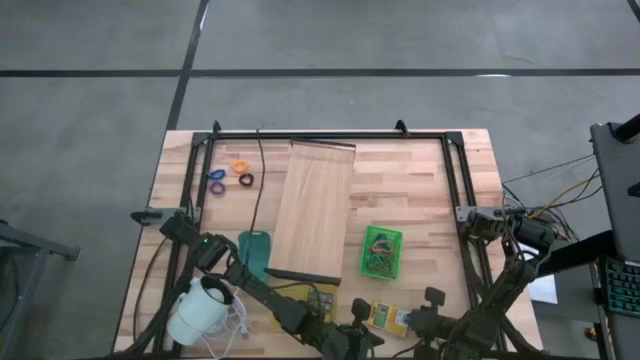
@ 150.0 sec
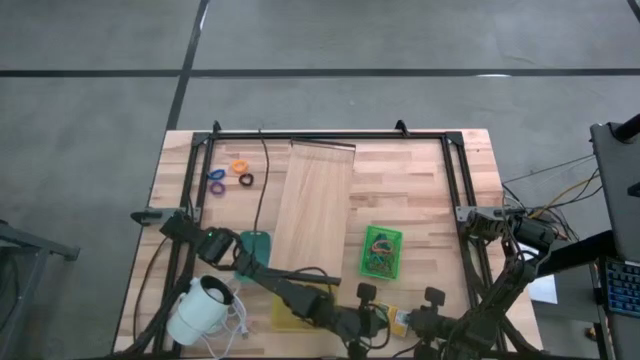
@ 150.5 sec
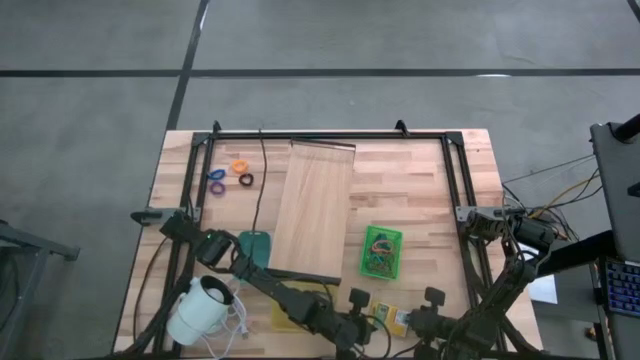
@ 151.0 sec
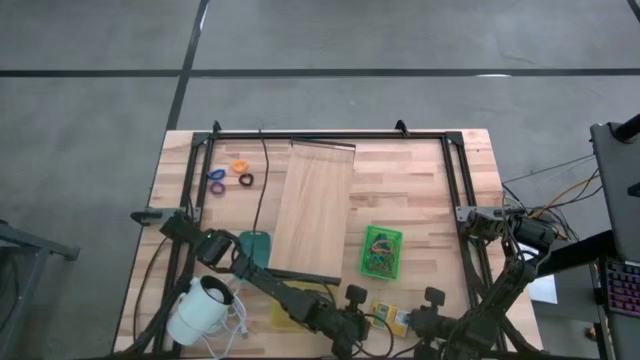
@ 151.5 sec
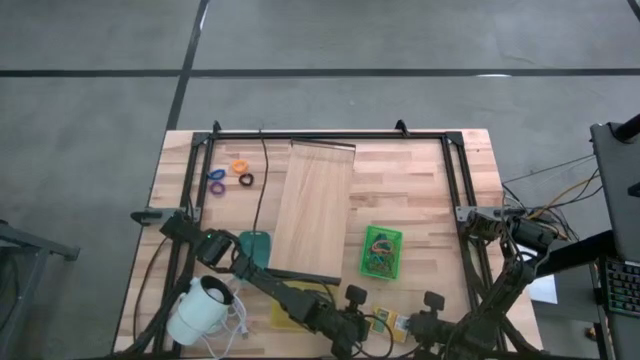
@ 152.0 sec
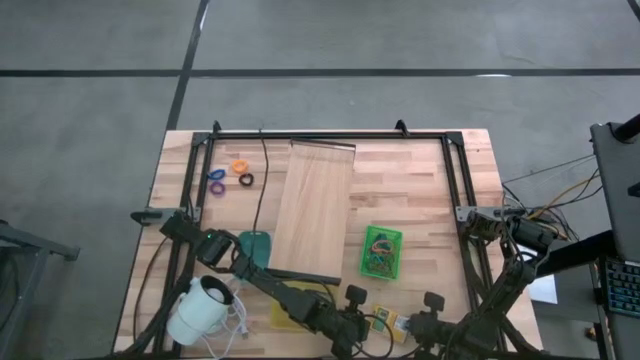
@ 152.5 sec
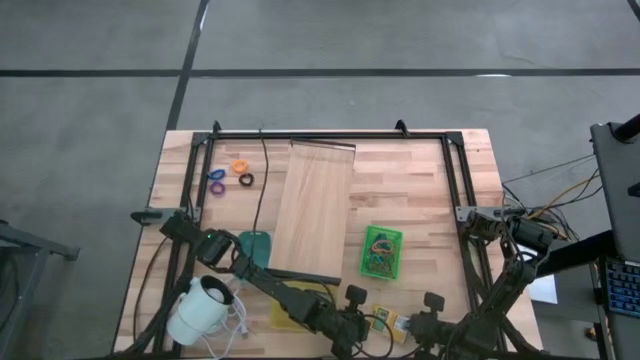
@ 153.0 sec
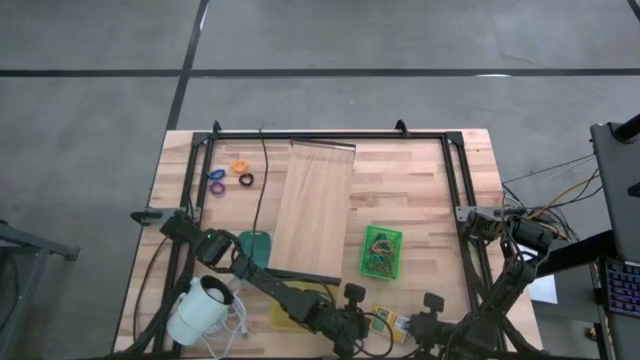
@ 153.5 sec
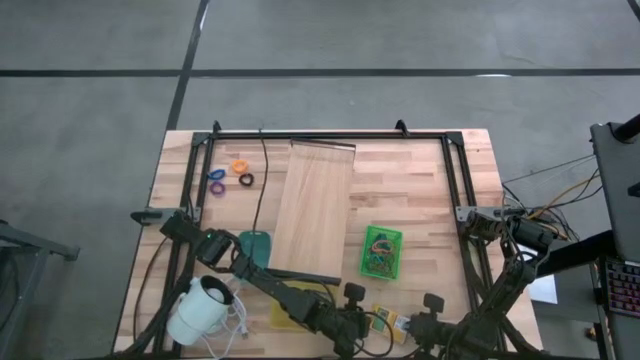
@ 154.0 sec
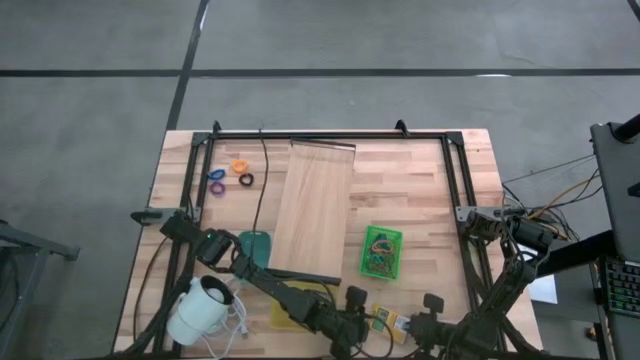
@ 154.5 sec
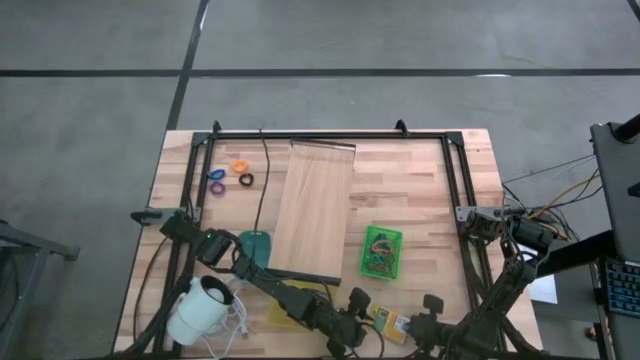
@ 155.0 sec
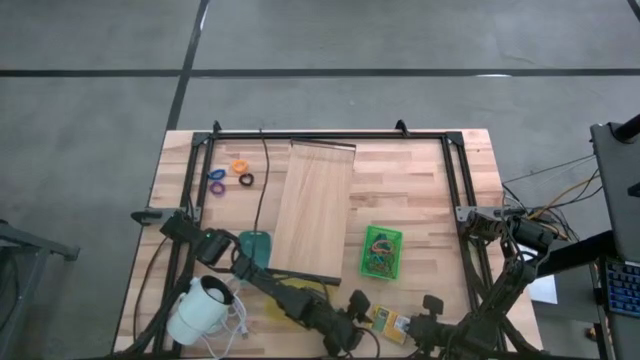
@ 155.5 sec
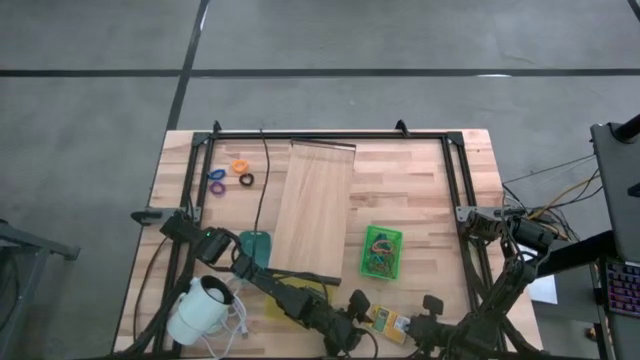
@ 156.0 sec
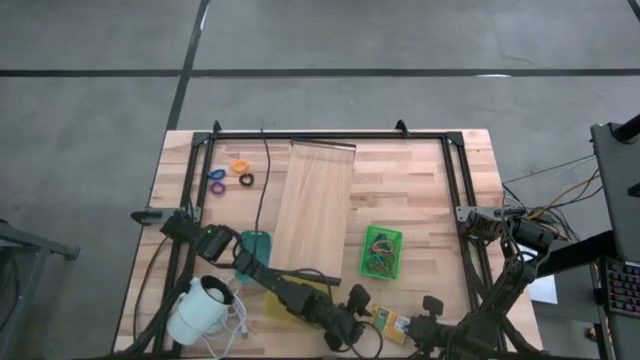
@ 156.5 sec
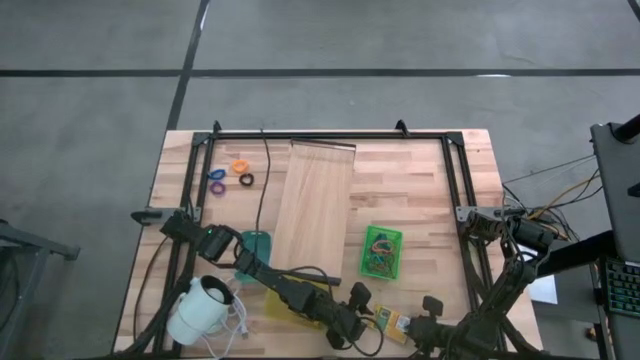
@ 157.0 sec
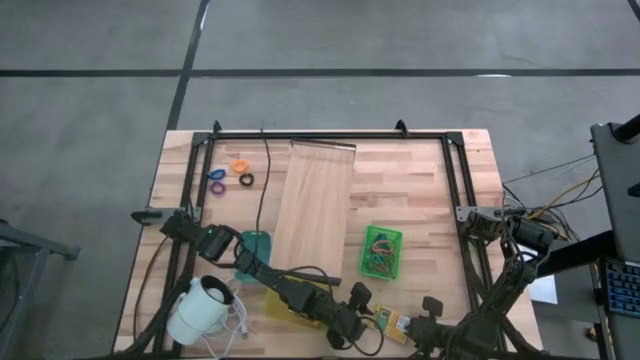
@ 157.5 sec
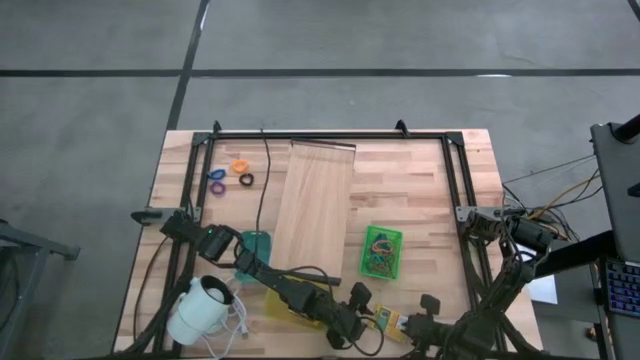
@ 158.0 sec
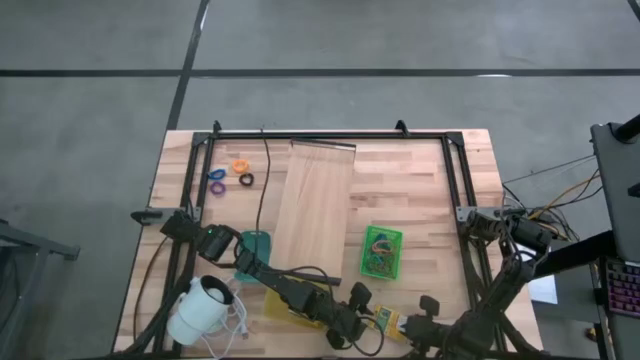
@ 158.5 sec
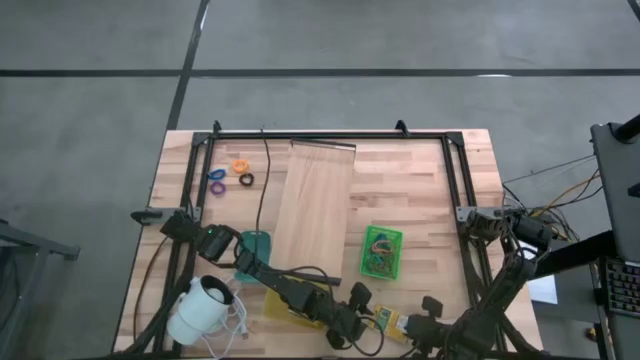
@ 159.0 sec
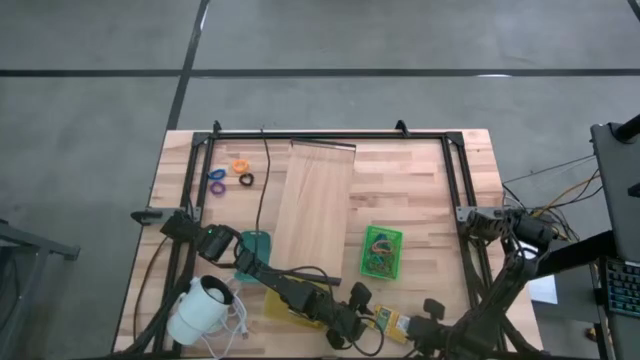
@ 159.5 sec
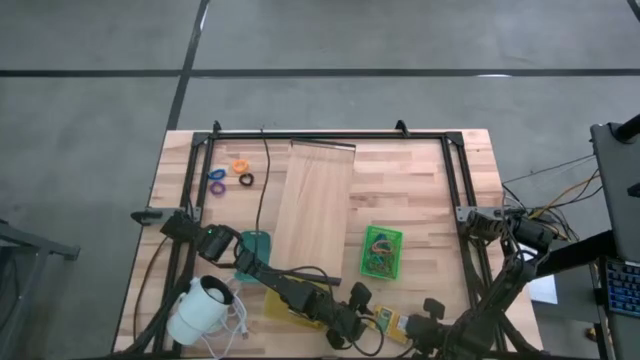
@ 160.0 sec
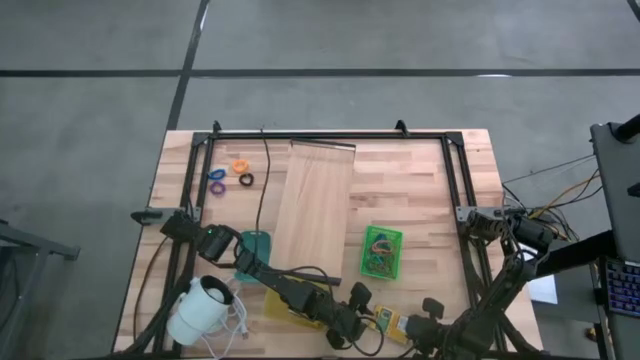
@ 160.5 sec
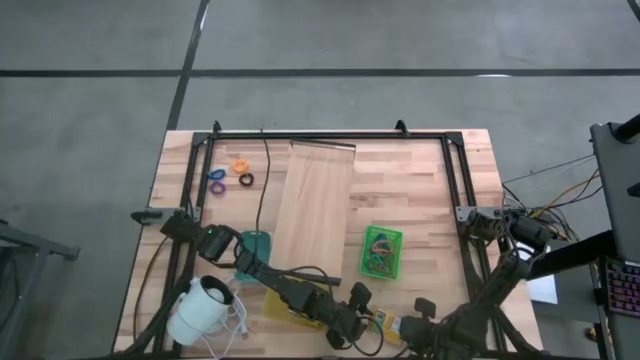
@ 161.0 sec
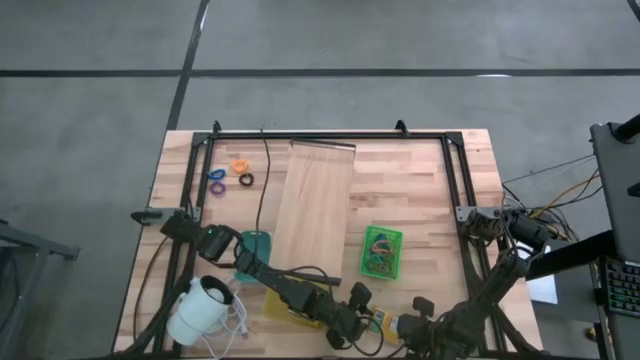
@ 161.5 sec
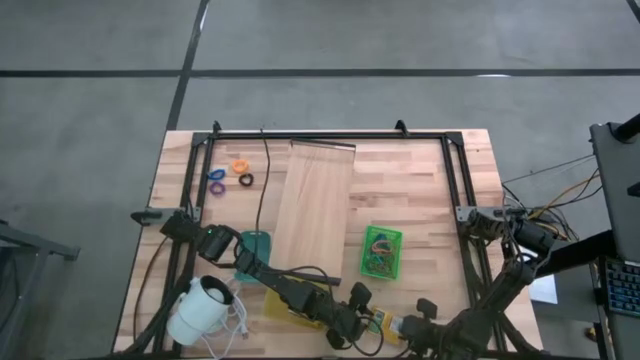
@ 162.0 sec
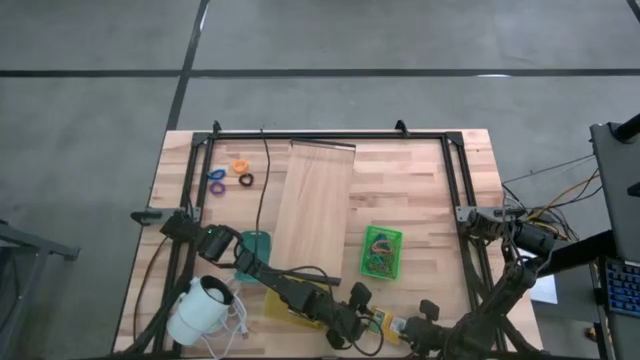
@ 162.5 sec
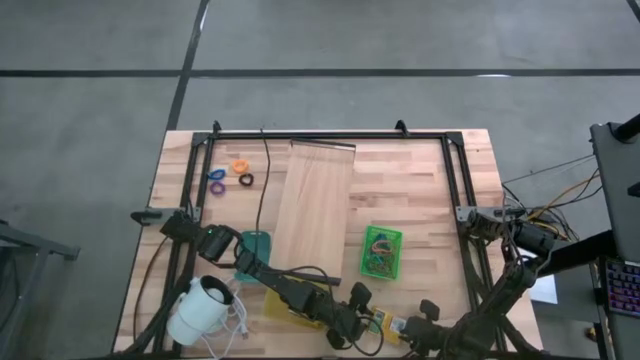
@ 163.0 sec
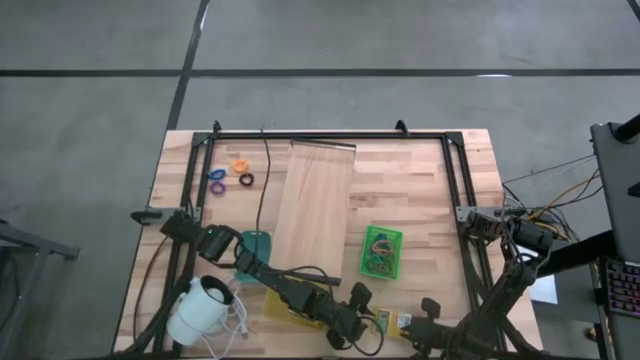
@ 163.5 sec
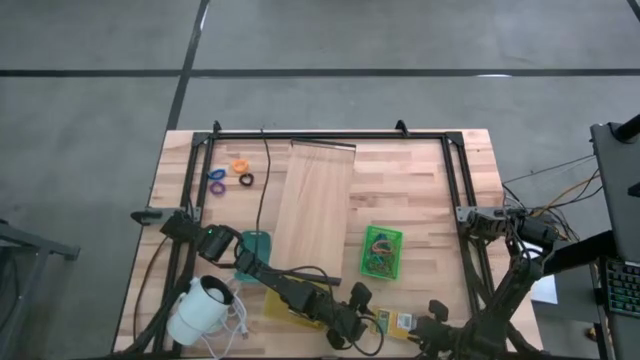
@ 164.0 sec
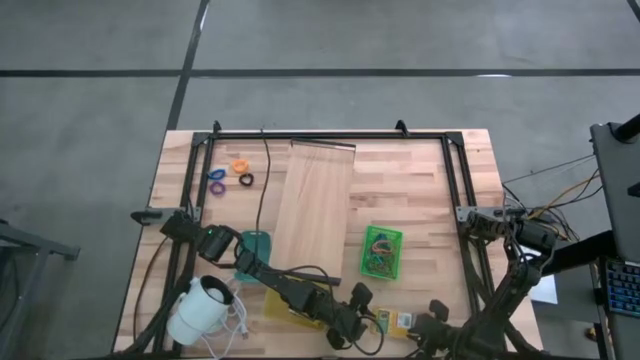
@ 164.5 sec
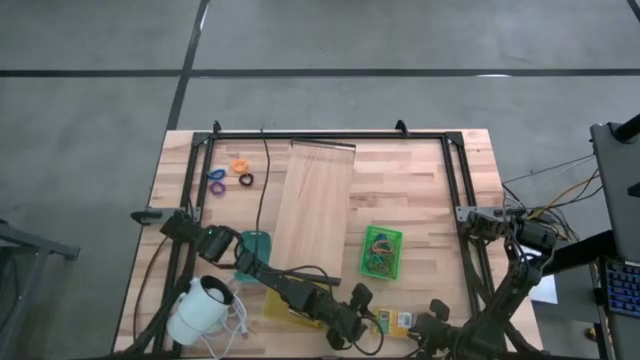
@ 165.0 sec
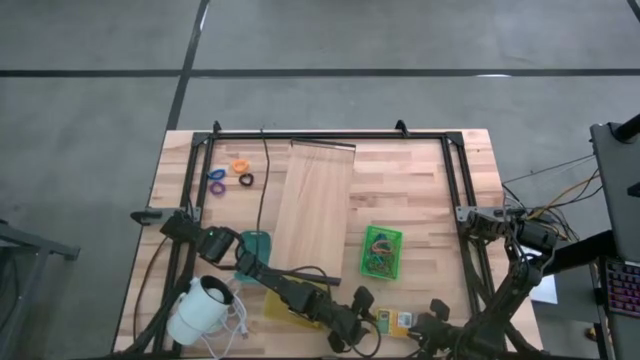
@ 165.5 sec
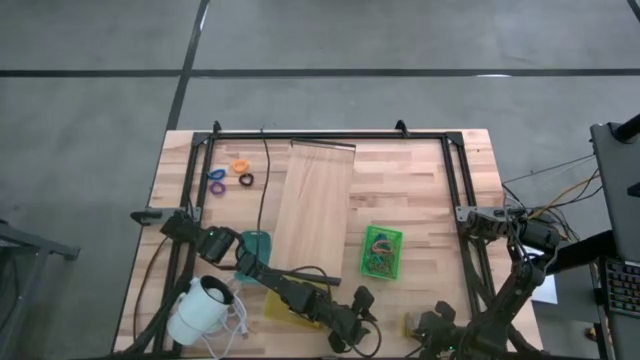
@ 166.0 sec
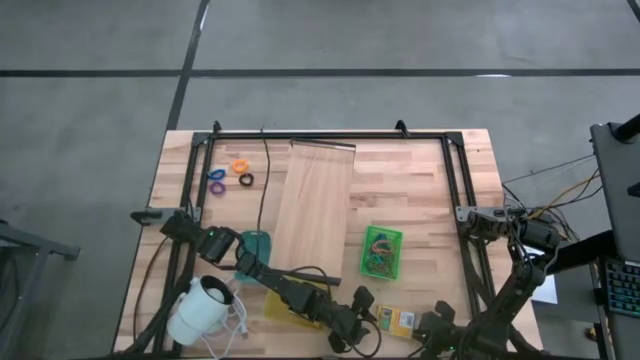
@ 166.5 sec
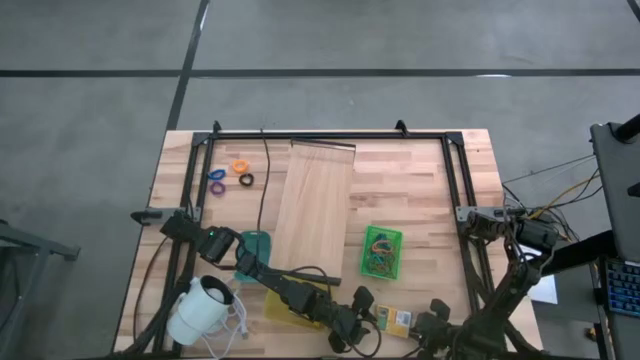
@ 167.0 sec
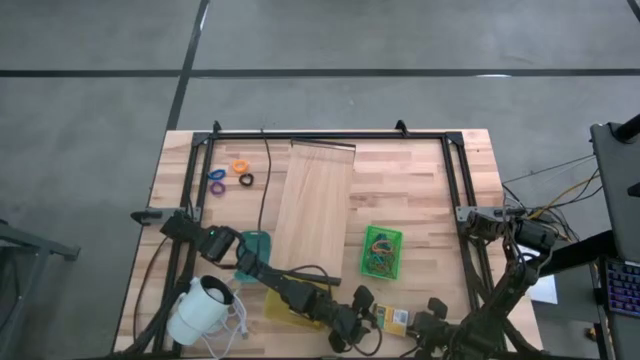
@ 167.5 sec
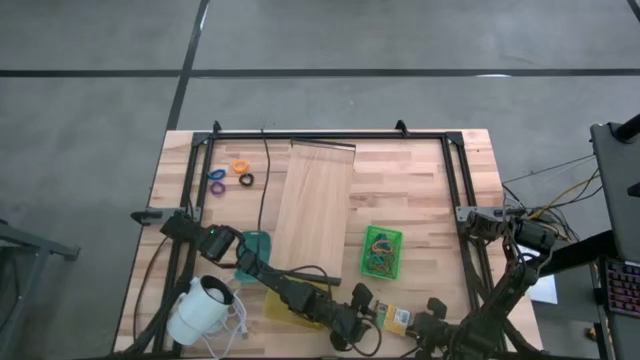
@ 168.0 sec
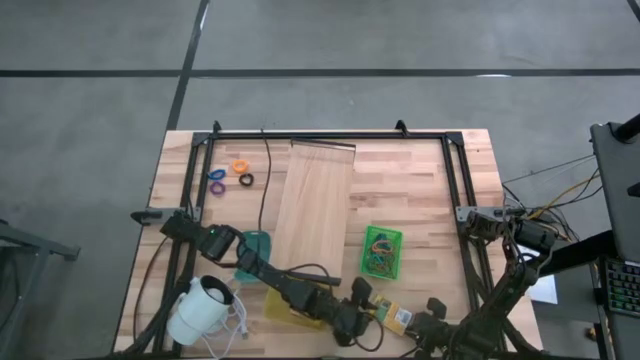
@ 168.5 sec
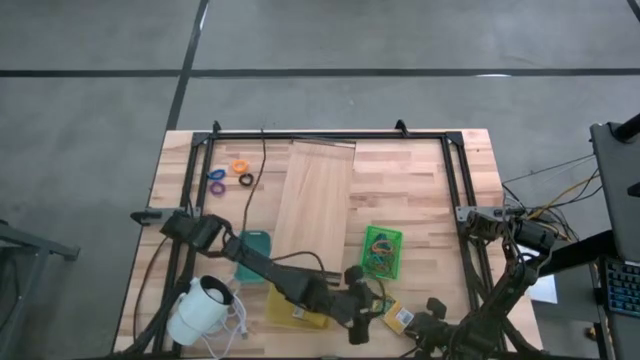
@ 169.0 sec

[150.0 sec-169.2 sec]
Task: Pick & Place Office Desk Supplies
Put the large yellow crayon box into the yellow bin

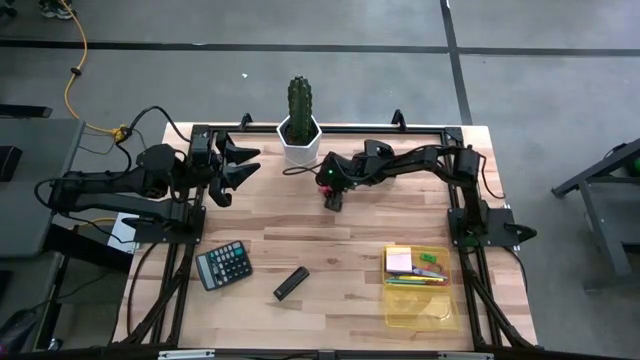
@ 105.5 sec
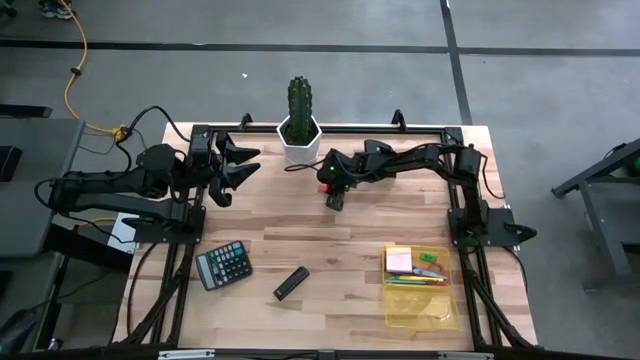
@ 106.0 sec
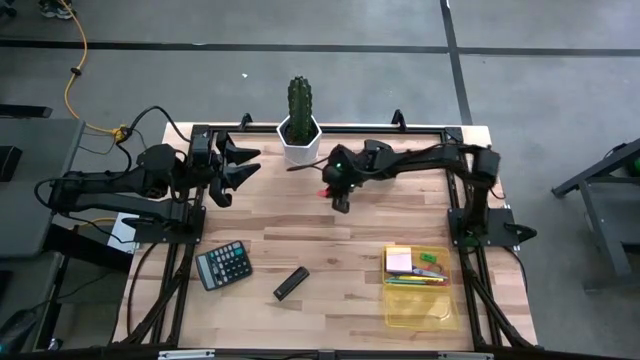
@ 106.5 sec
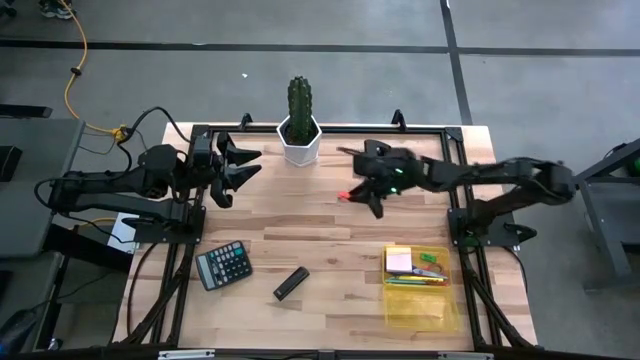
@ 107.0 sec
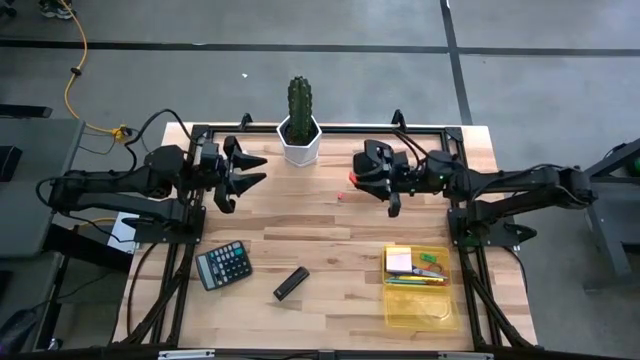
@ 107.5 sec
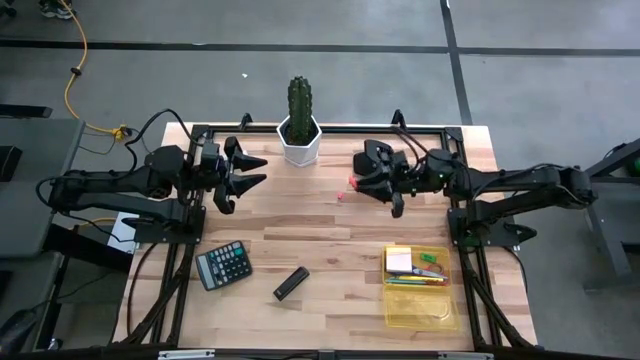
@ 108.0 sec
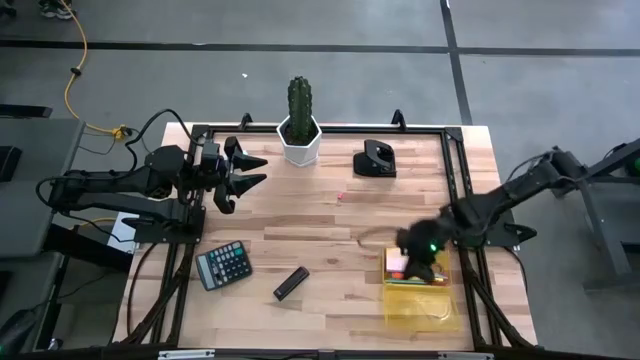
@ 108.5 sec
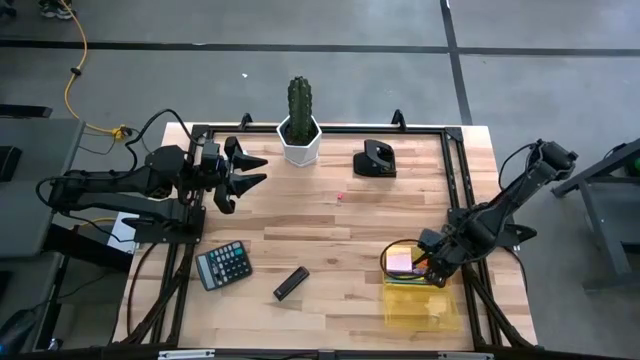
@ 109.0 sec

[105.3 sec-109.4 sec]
Task: Pack school essentials
Put the large orange eraser on the yellow supply box
